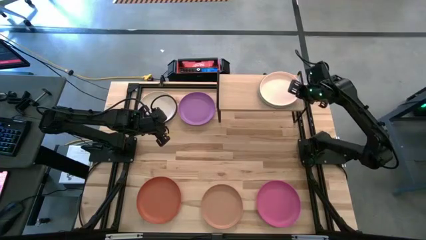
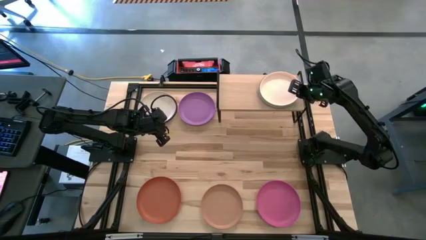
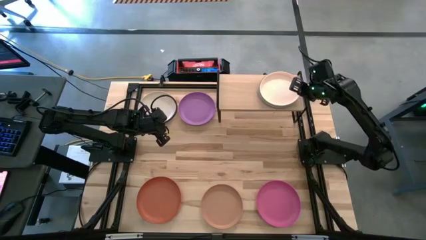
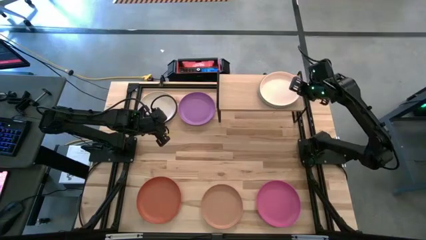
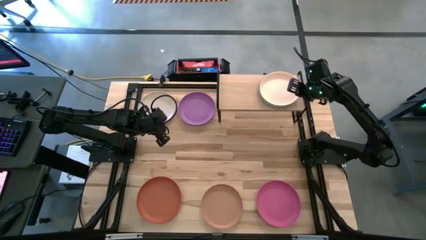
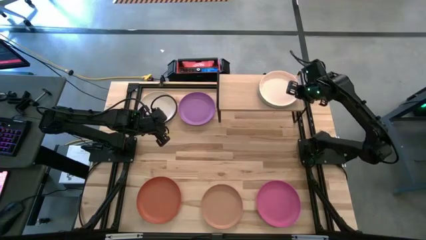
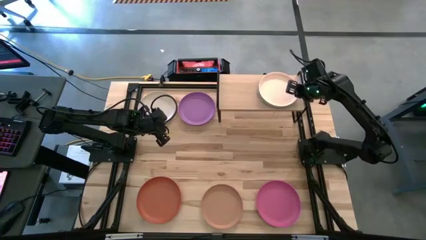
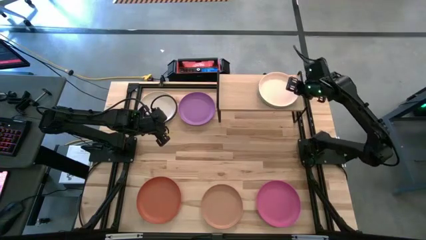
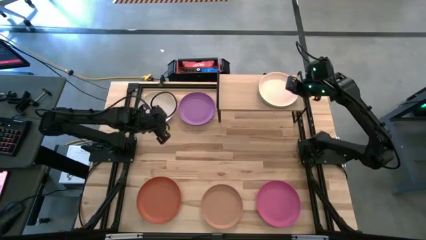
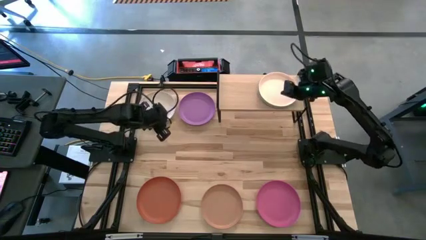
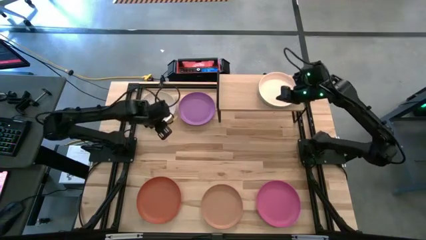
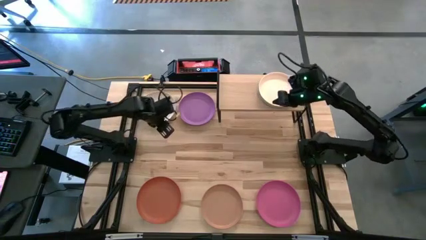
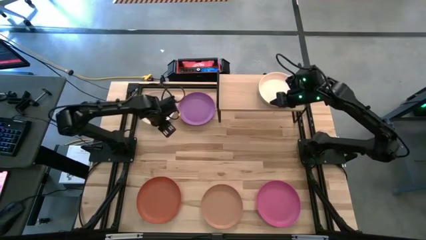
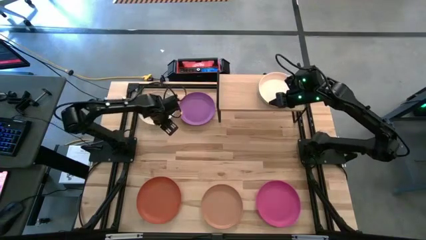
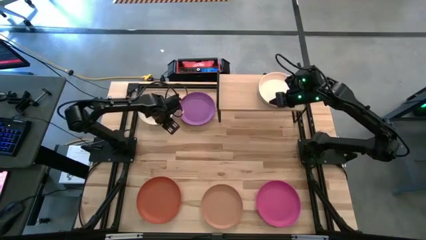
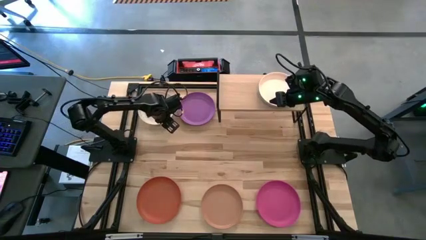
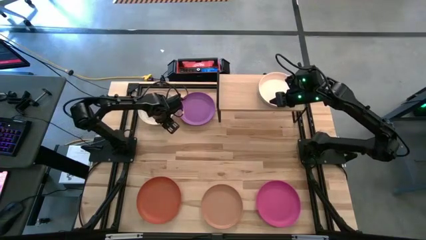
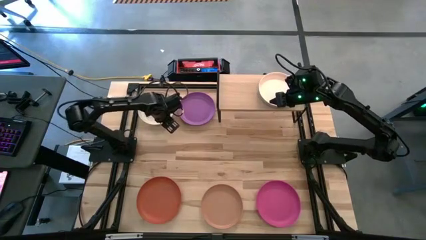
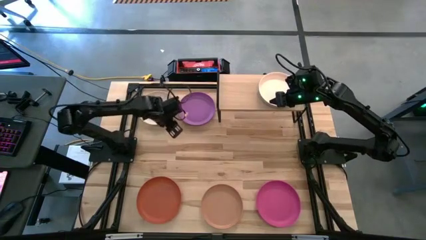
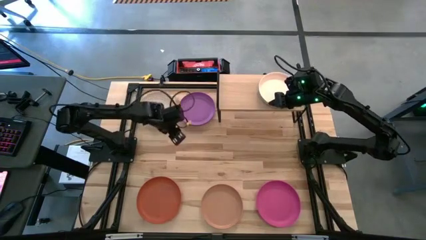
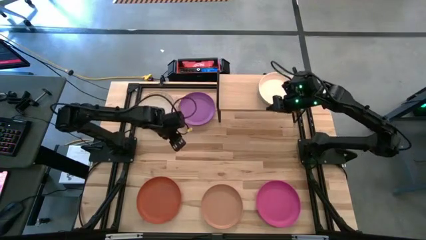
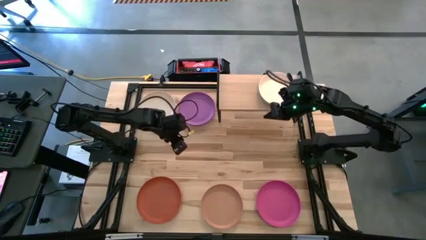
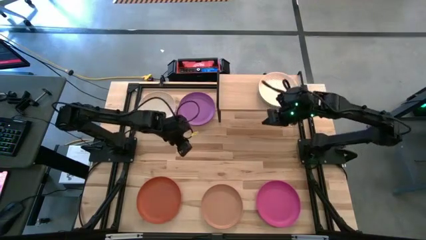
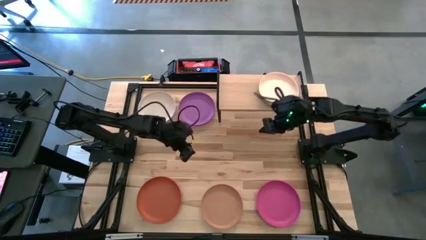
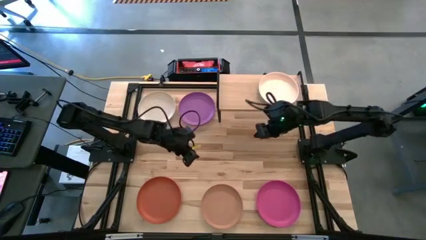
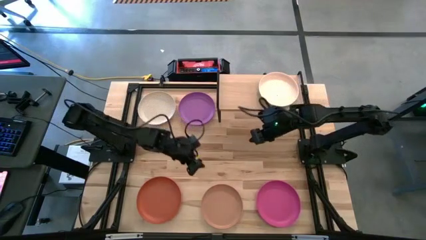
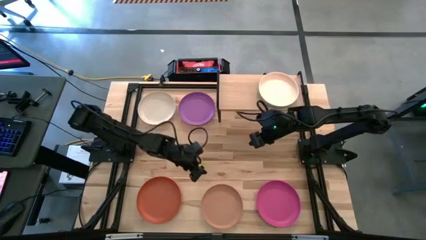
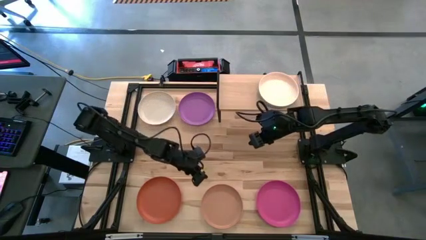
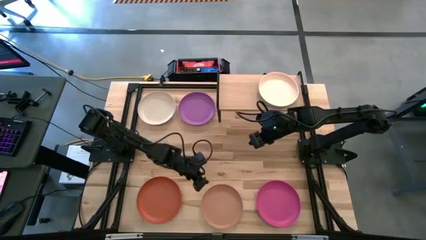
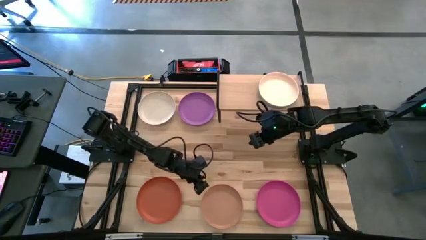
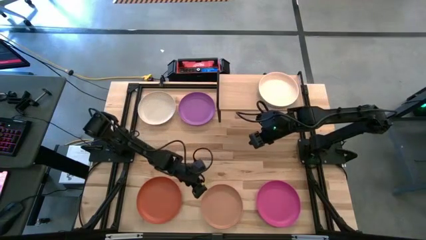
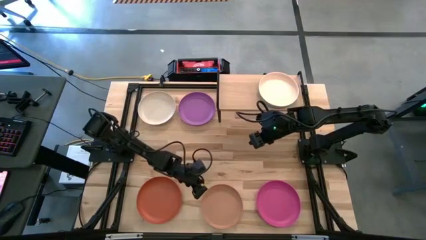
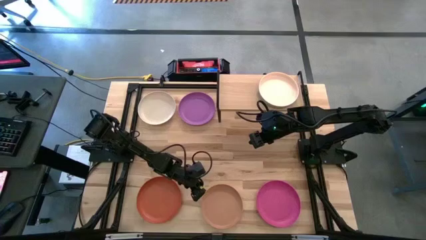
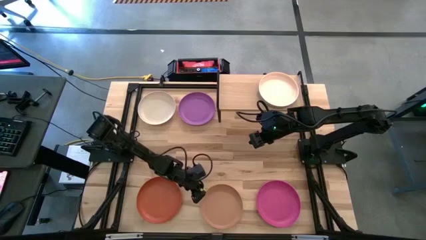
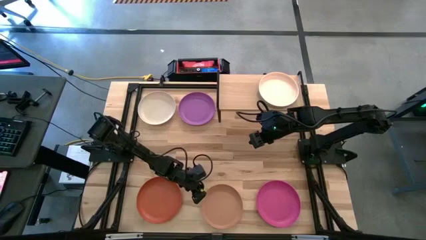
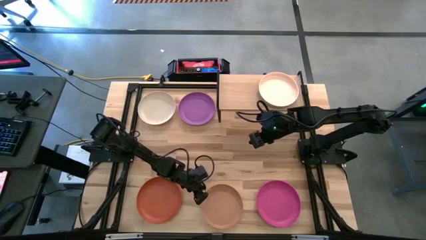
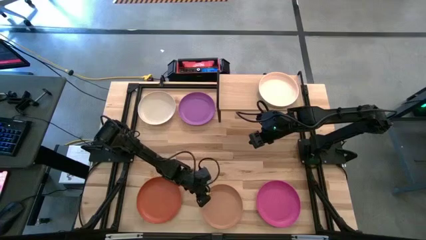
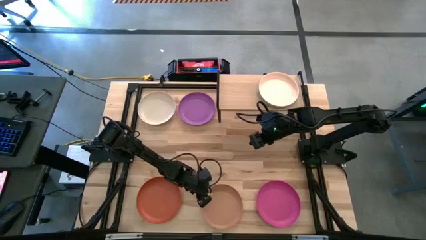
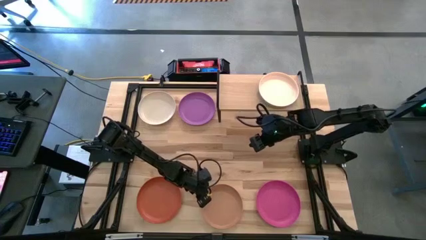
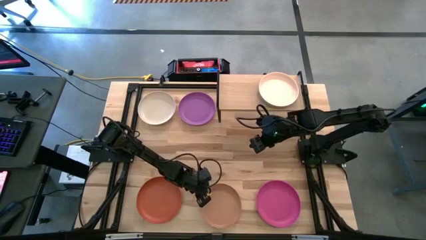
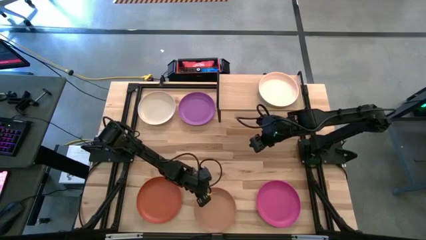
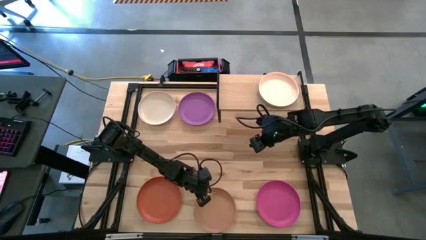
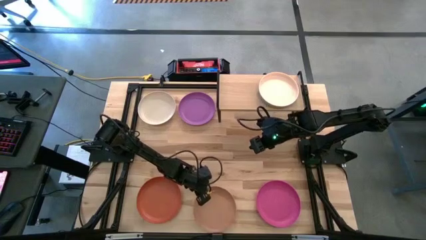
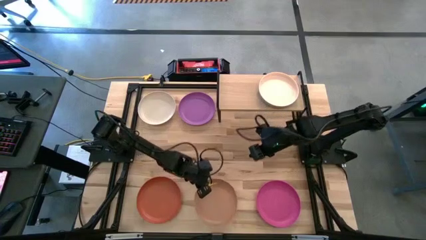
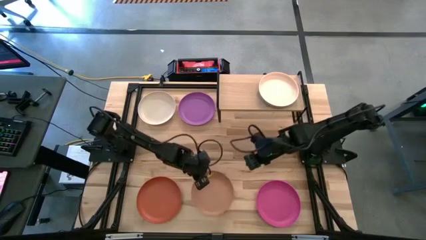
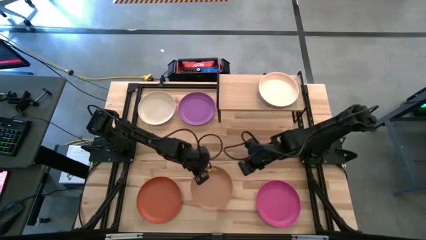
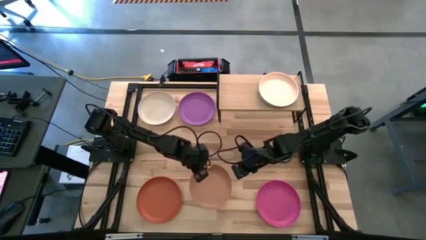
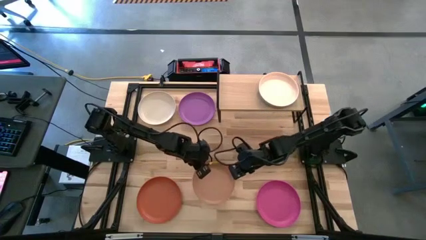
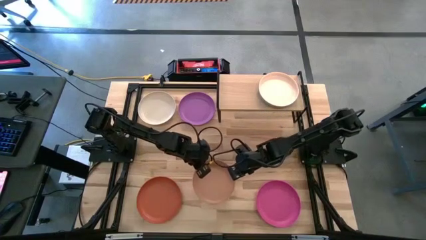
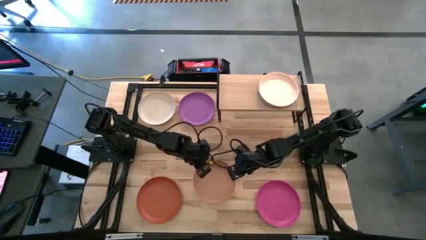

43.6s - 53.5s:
Task: Place and stack plates onto a shelf
Stack the brown plate on top of the light orange stacked plates on the shelf
